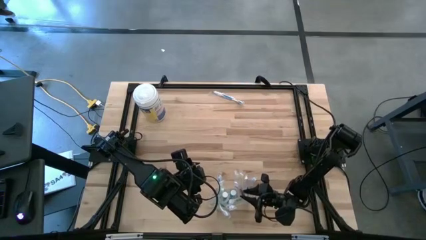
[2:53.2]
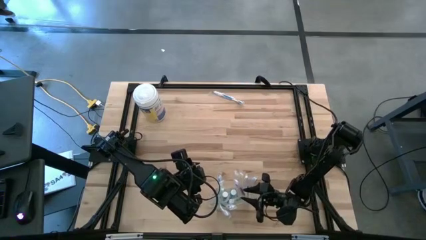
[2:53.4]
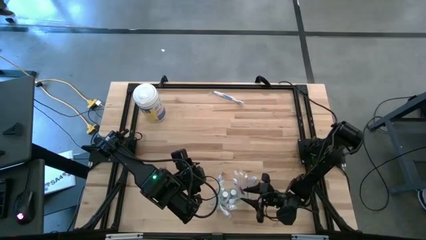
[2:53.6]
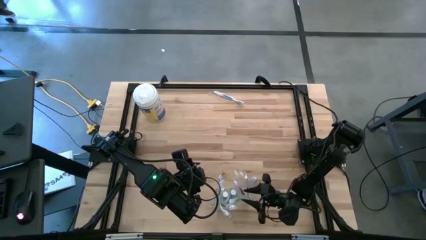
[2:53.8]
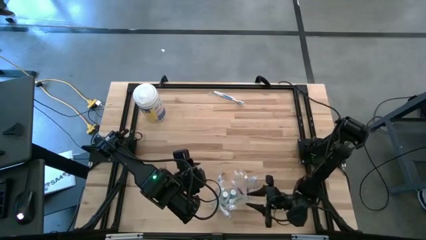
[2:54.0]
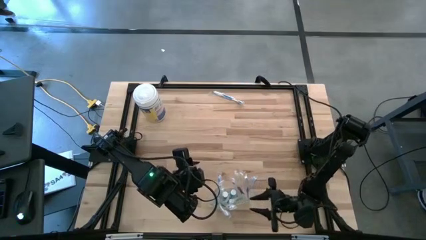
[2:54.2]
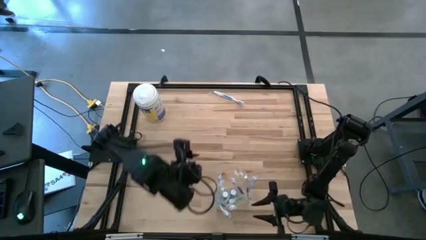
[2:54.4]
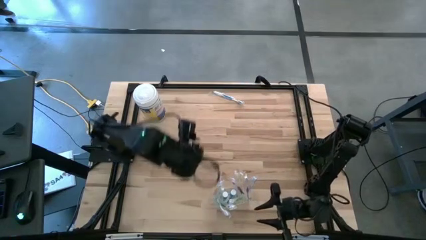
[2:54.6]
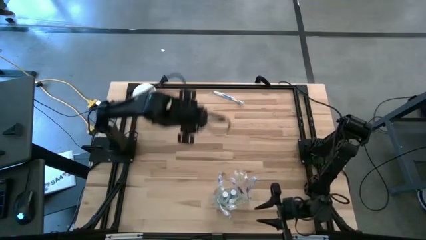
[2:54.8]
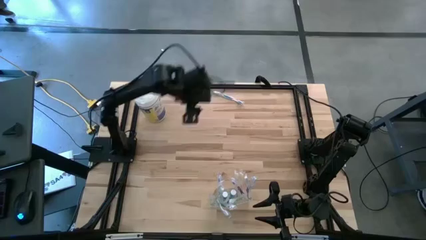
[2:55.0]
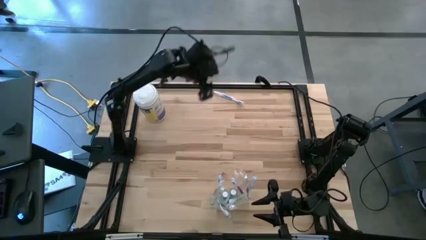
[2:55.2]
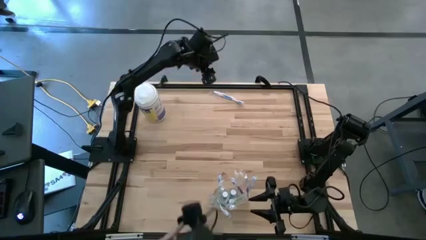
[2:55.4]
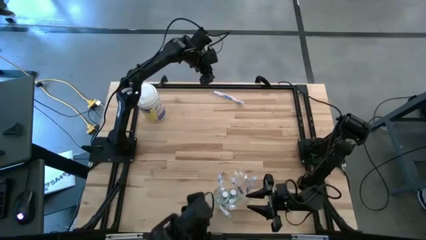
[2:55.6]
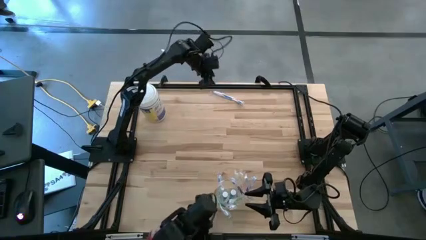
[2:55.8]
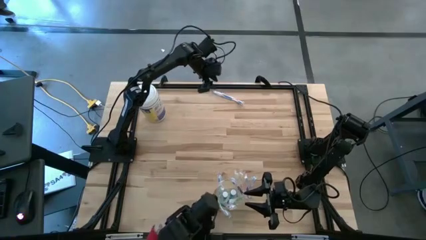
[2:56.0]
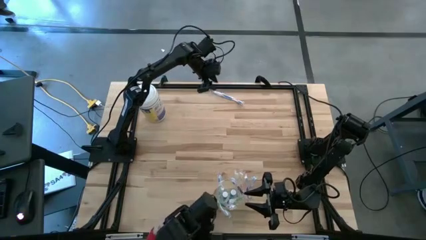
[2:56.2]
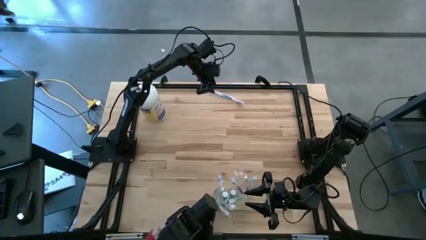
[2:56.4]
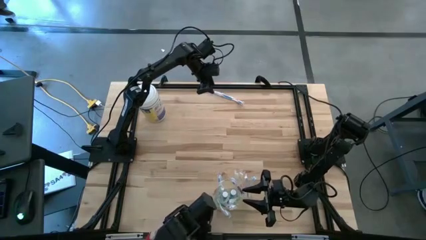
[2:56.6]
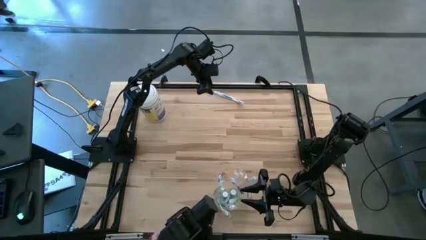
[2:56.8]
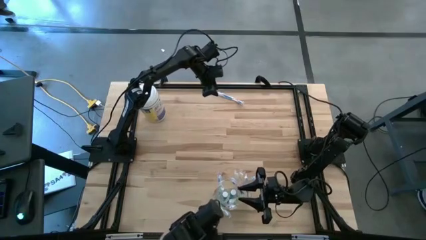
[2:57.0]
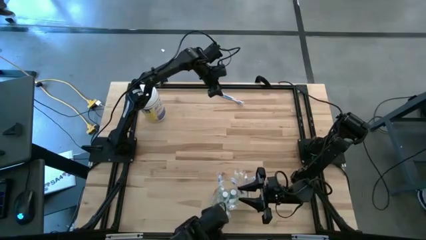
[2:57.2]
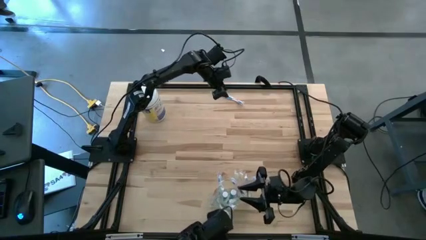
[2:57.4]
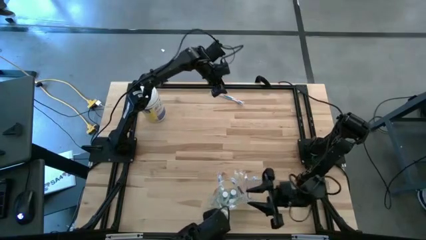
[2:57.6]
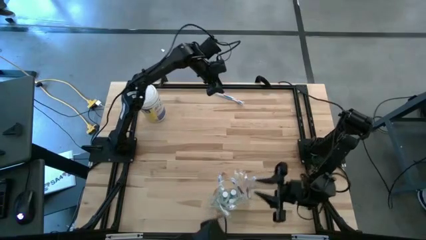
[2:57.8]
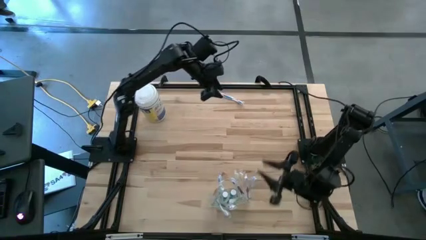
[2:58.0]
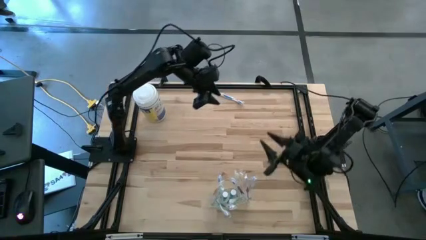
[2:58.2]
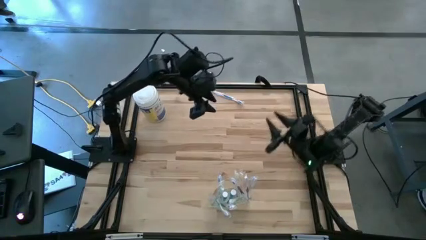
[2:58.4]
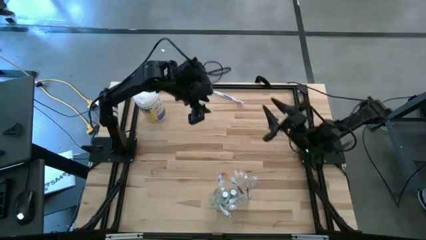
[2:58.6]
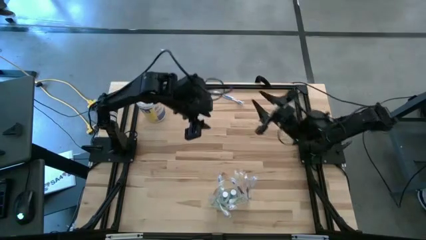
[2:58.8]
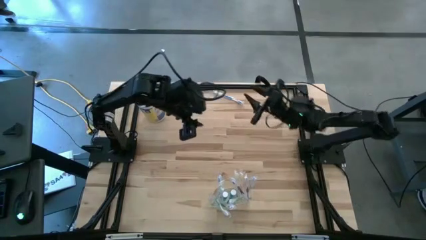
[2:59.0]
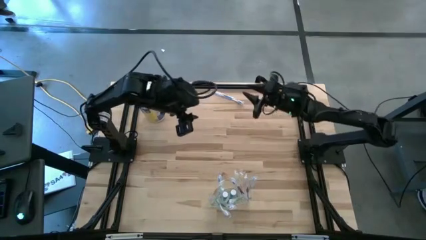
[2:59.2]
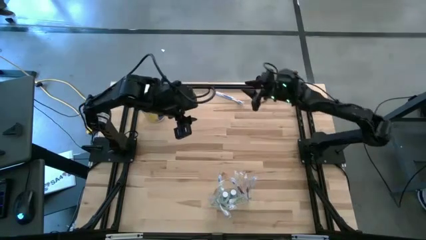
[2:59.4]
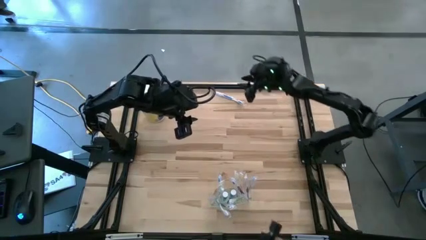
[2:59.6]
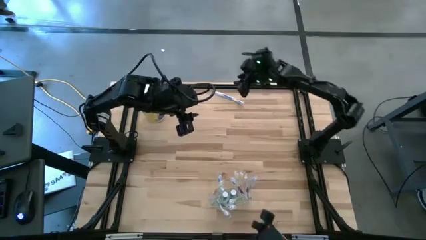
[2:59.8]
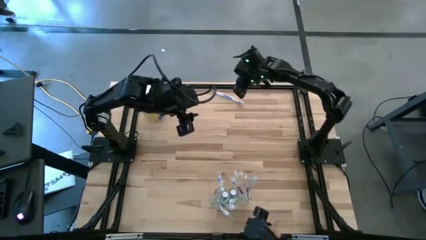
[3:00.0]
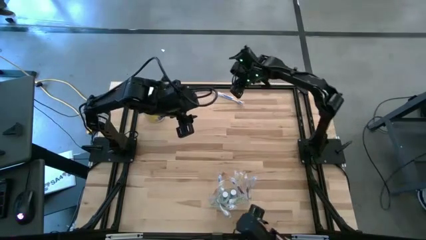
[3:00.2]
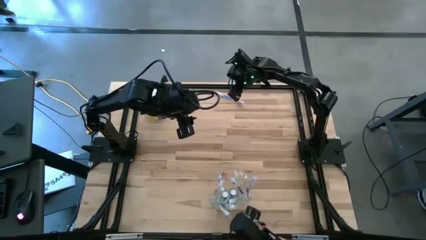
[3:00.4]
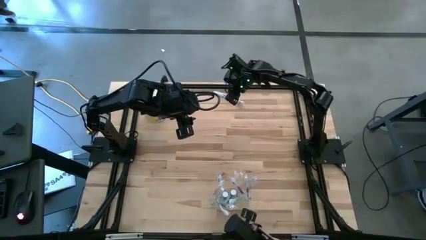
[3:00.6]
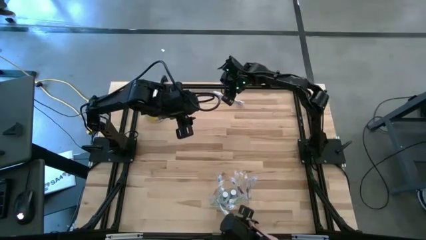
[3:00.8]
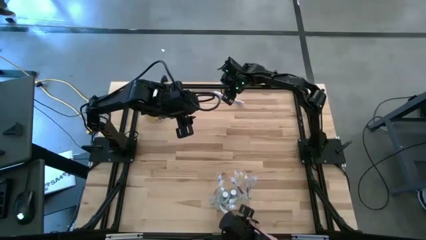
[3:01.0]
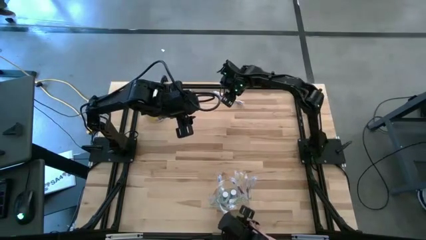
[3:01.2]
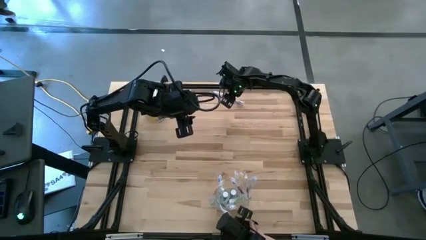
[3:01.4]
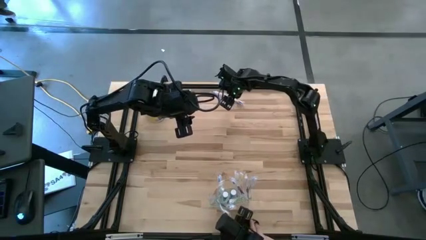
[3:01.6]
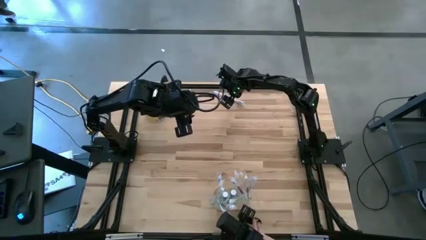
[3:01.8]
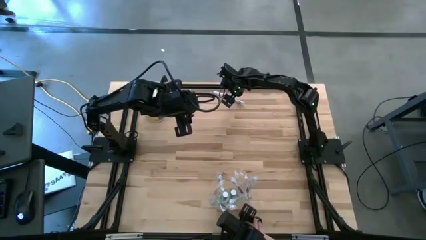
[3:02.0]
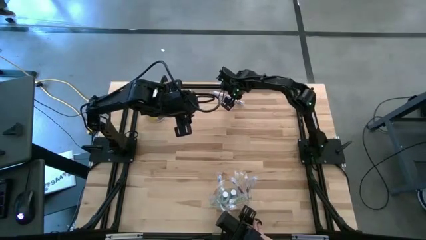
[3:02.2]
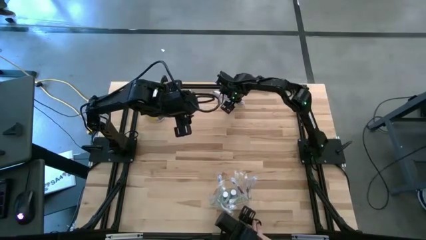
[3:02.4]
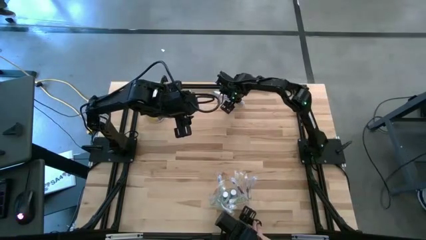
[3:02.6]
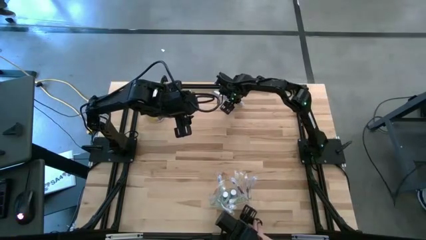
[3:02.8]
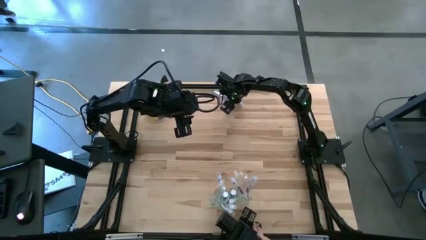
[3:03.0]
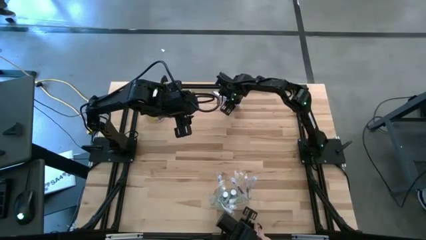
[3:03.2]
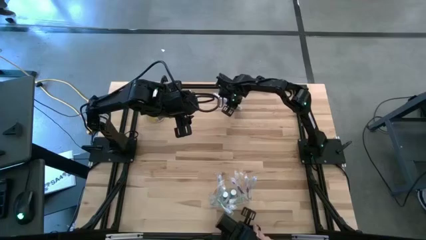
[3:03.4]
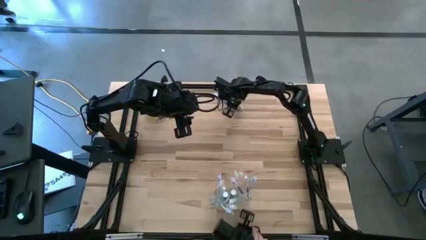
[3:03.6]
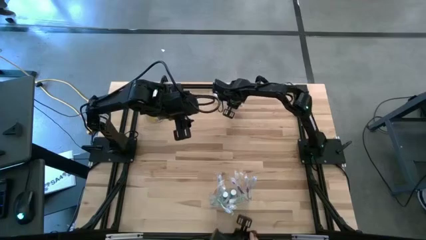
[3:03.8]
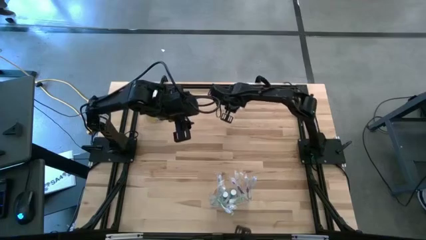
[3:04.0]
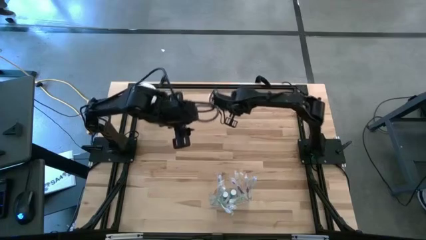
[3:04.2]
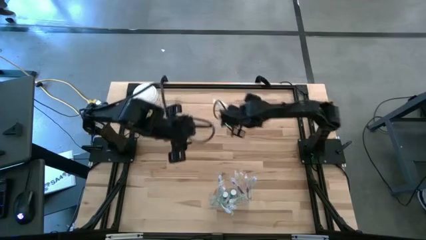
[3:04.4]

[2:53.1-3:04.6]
Task: Pick & Place toothbrushing station
Put the blue toothbrush into the transparent bin
